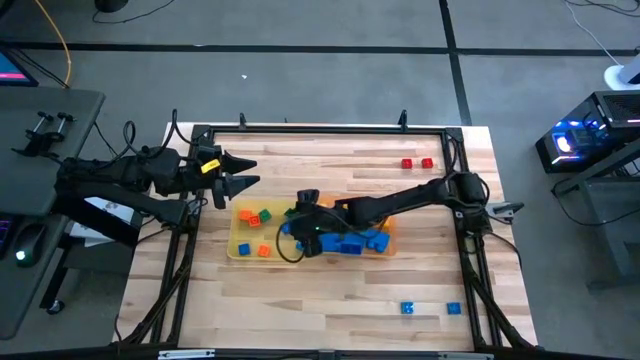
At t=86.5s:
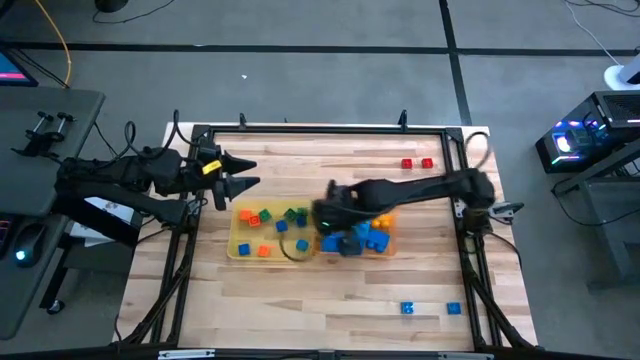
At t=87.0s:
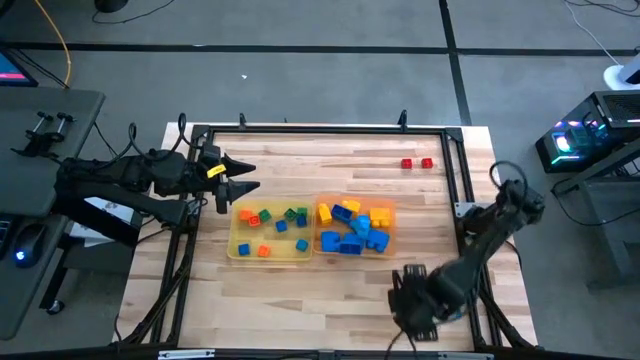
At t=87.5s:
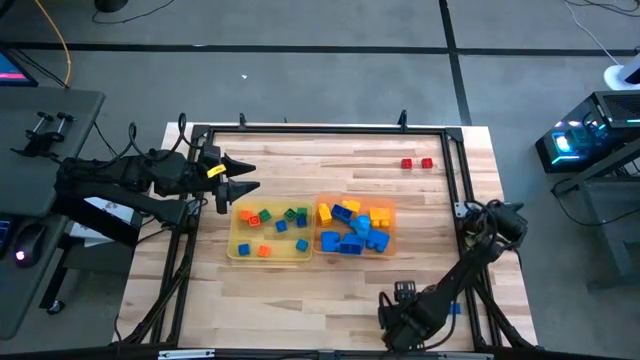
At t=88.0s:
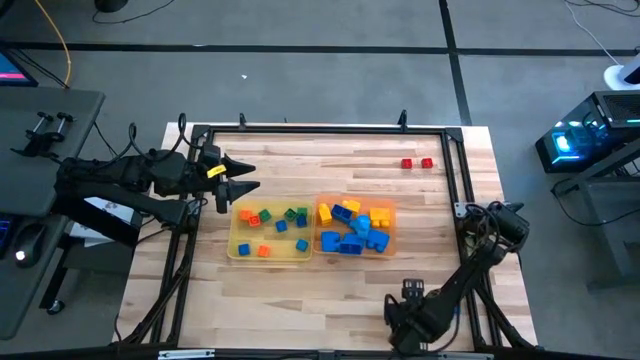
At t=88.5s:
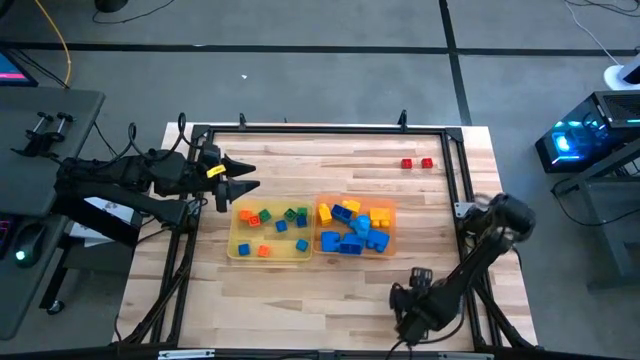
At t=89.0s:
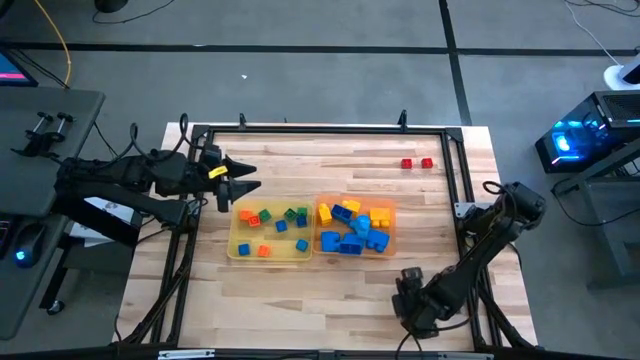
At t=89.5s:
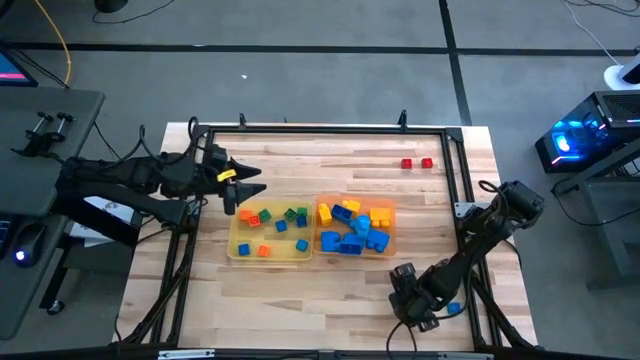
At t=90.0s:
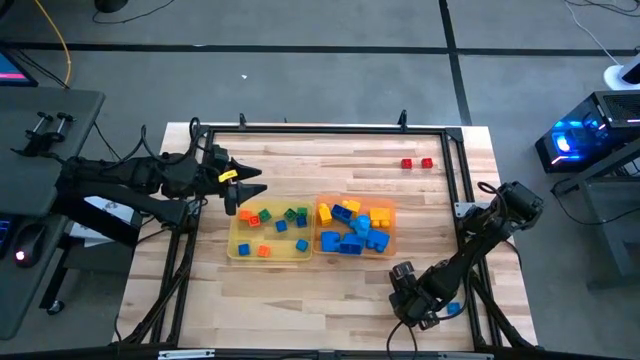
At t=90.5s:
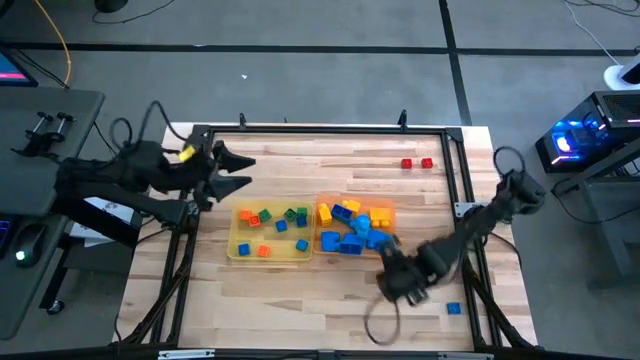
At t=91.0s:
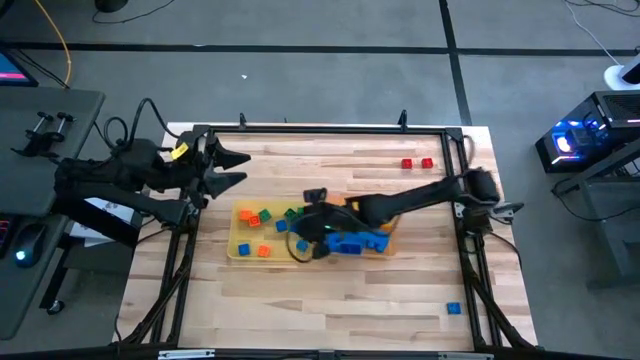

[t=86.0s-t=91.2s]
Task: Sort blocks by size
Put the small blue game piece into the yellow bin

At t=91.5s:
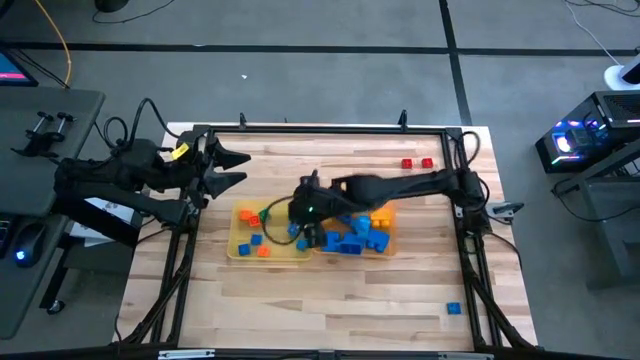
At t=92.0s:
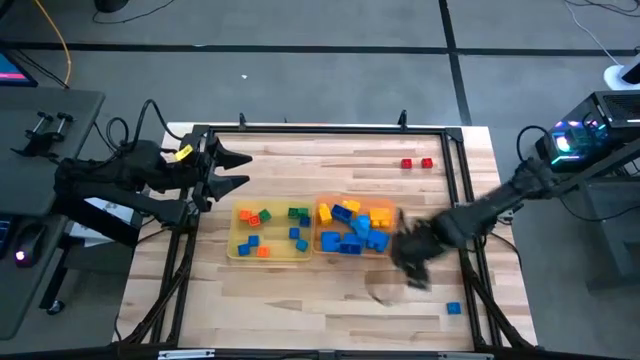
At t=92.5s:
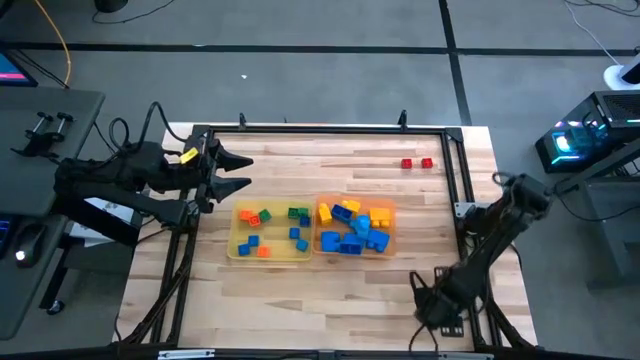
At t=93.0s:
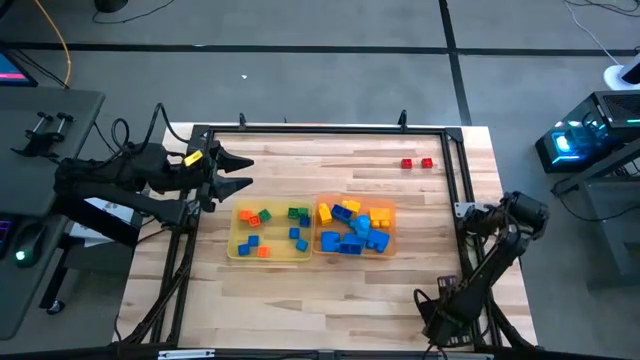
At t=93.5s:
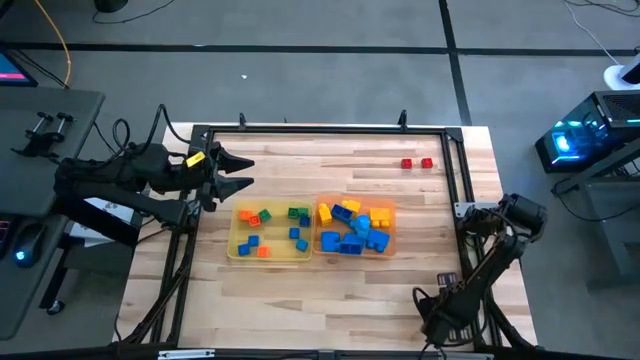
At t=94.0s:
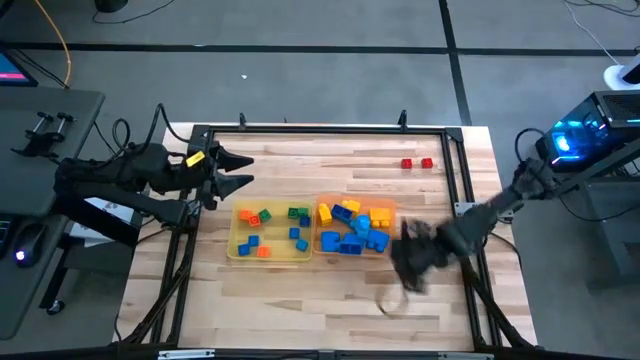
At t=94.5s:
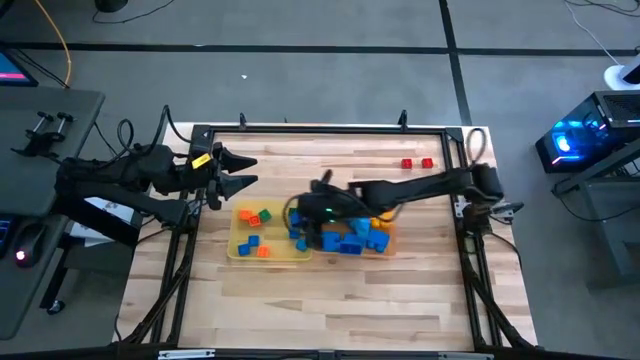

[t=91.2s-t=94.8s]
Put the small blue game piece into the yellow bin

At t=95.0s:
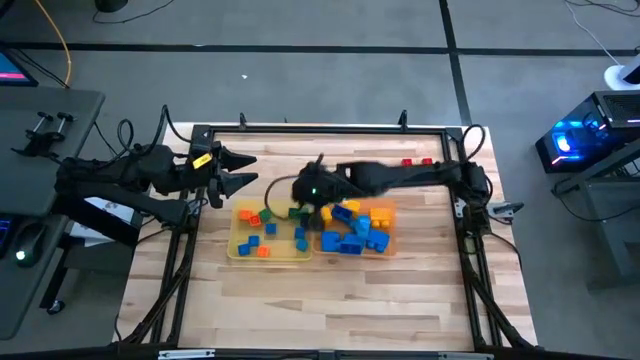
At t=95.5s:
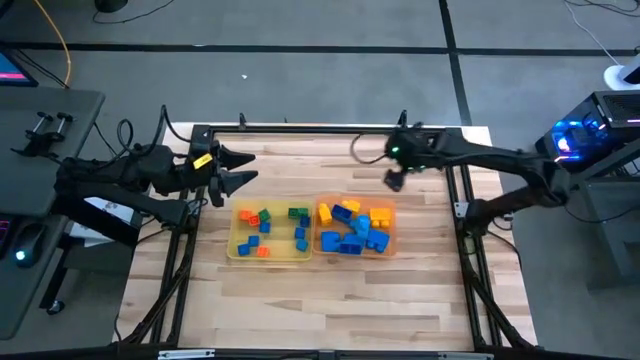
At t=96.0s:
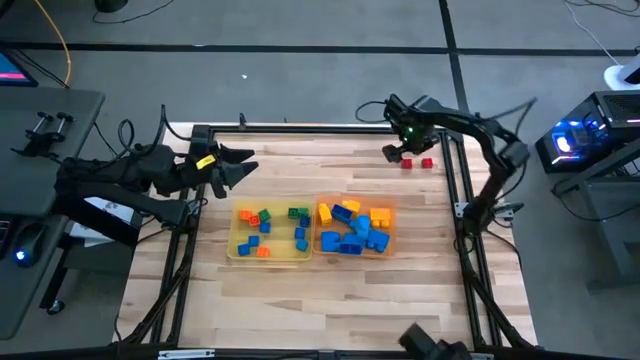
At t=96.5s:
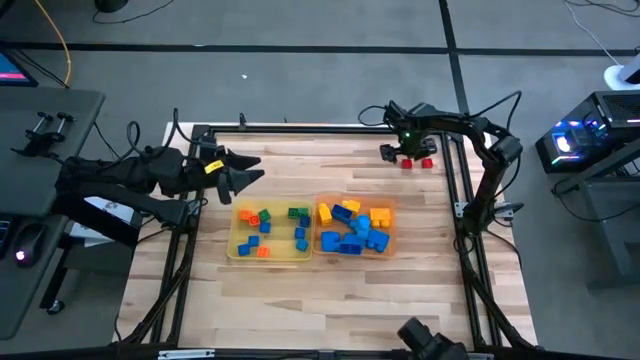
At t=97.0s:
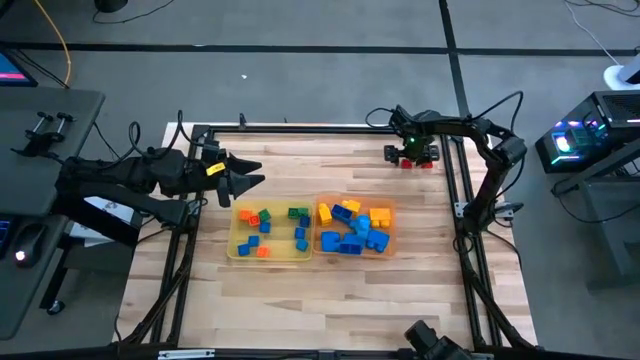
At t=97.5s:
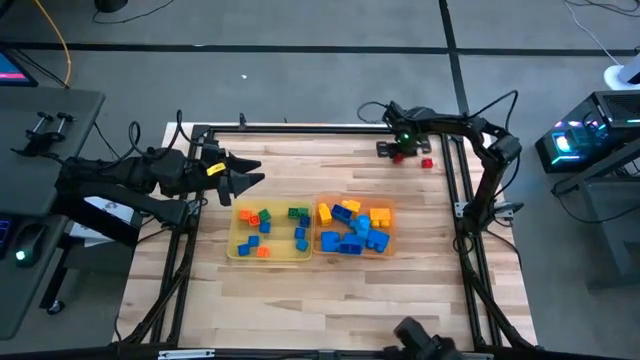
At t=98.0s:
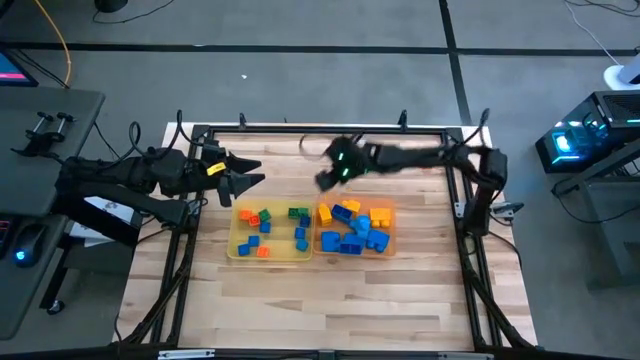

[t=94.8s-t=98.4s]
Put the left small red game piece into the yellow bin

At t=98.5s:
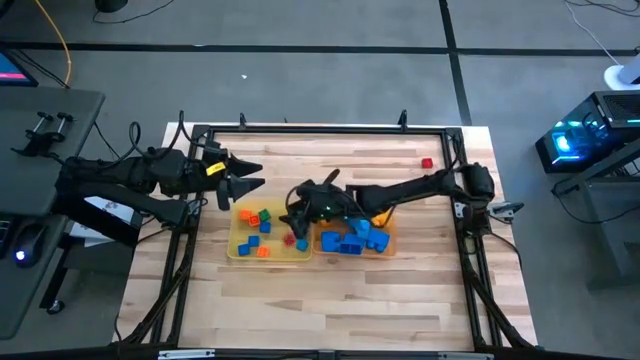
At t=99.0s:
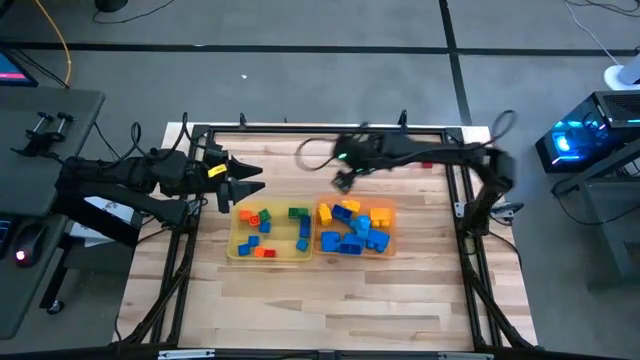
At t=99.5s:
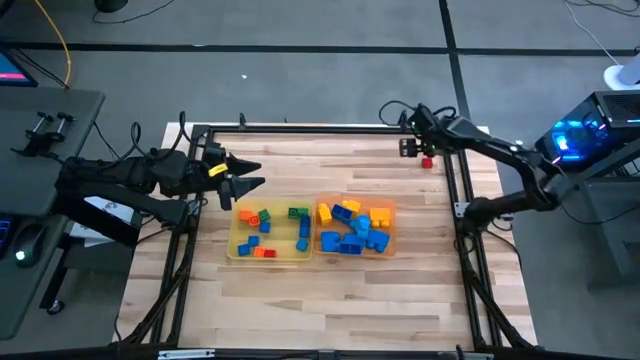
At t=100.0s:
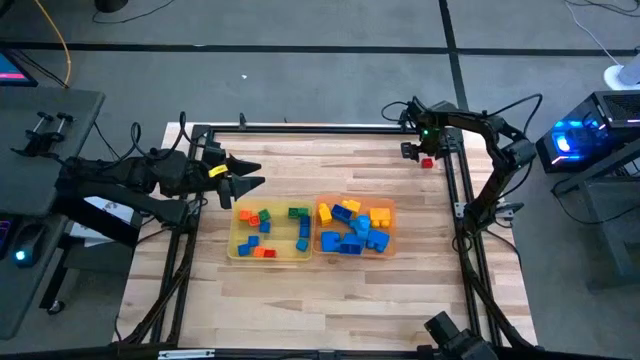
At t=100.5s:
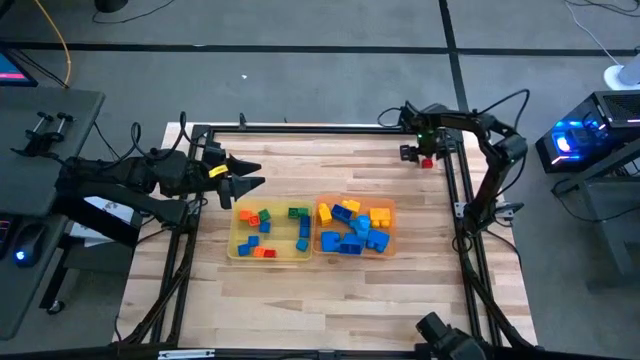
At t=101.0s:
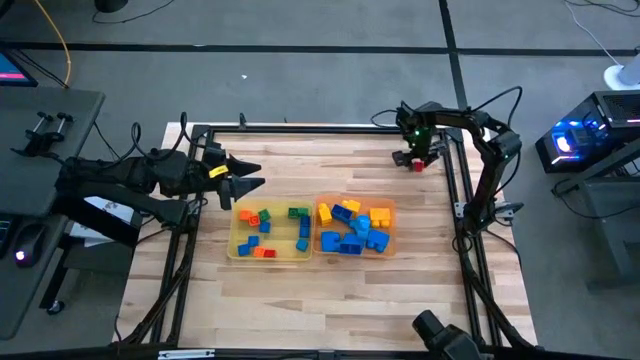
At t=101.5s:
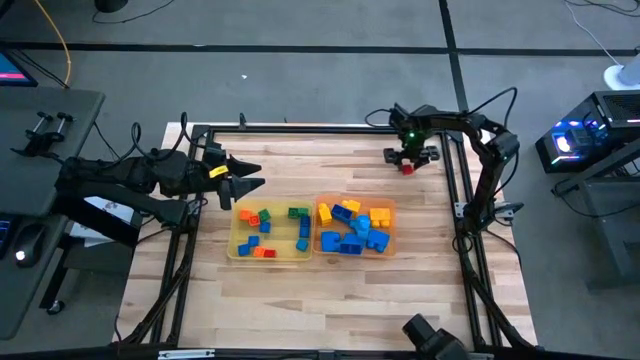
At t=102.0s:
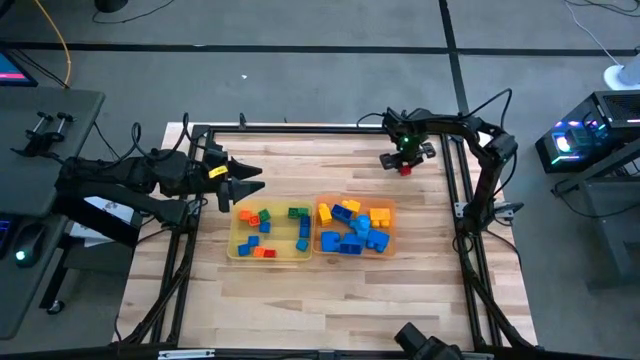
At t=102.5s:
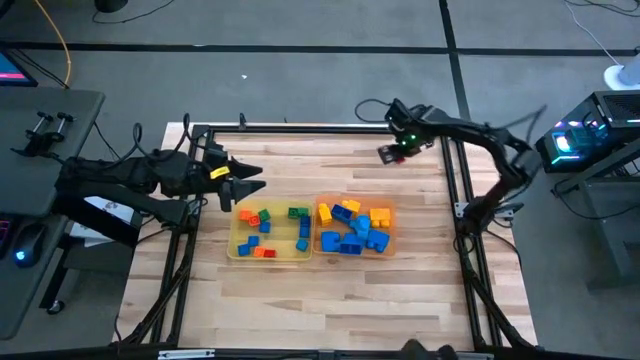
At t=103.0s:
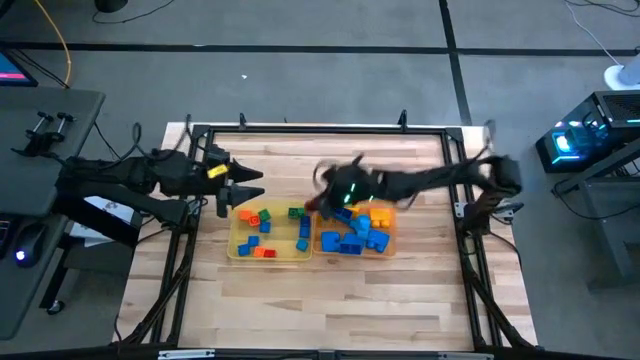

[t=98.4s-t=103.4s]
Put the small red game piece into the yellow bin

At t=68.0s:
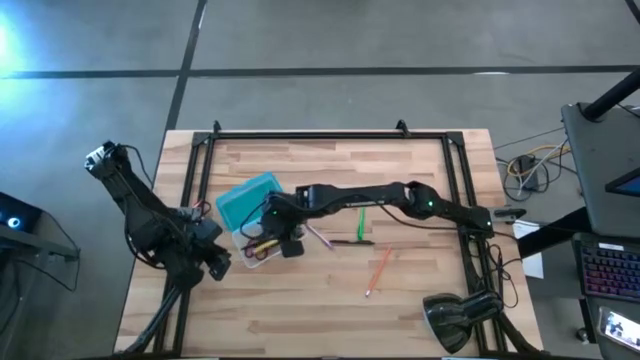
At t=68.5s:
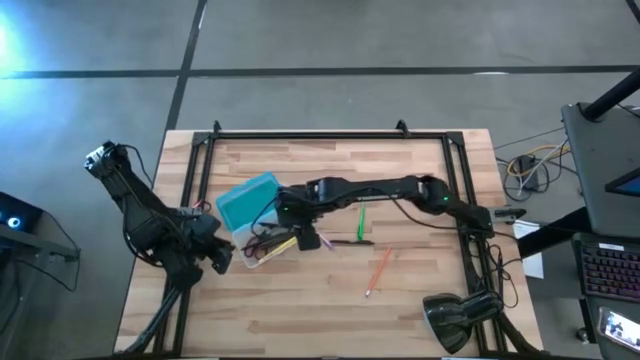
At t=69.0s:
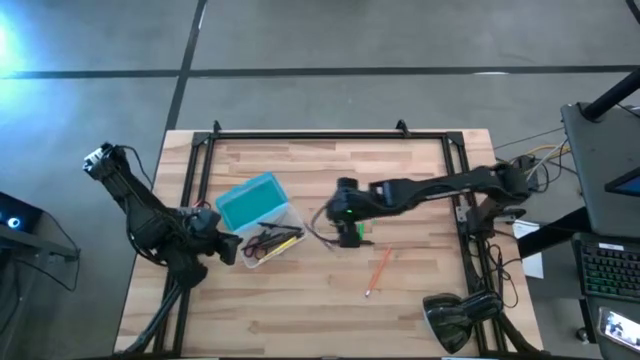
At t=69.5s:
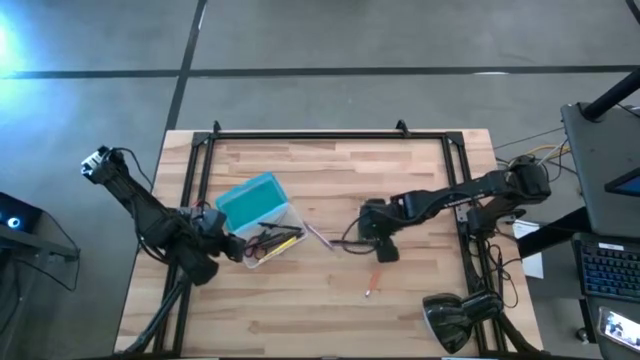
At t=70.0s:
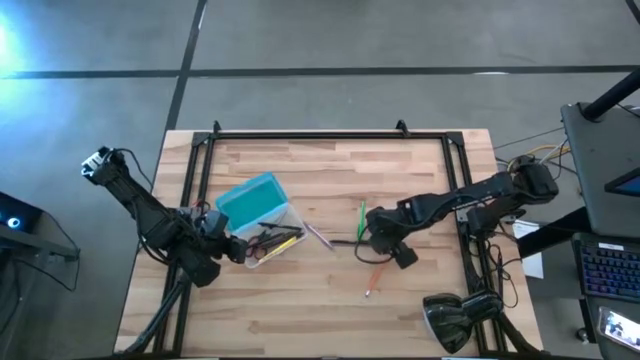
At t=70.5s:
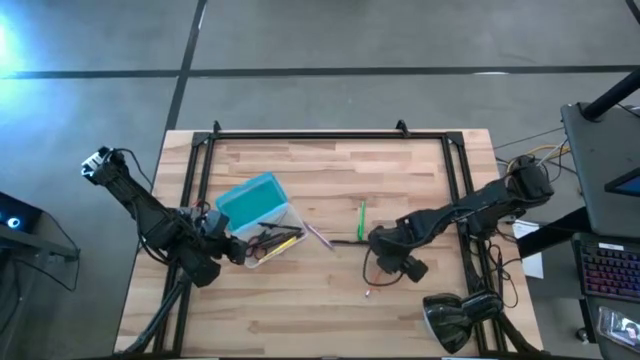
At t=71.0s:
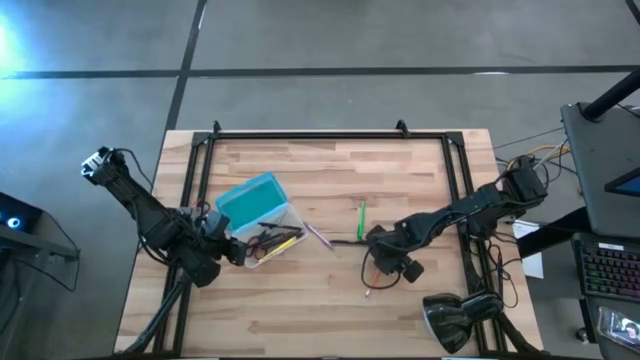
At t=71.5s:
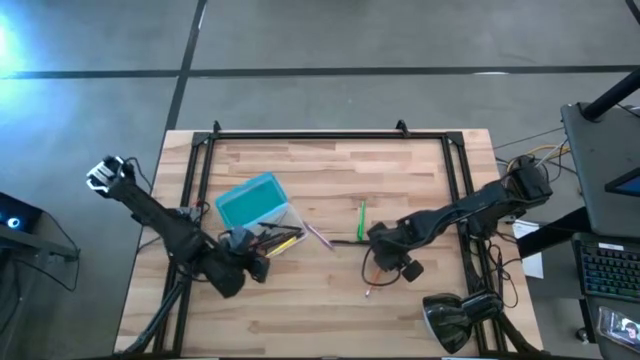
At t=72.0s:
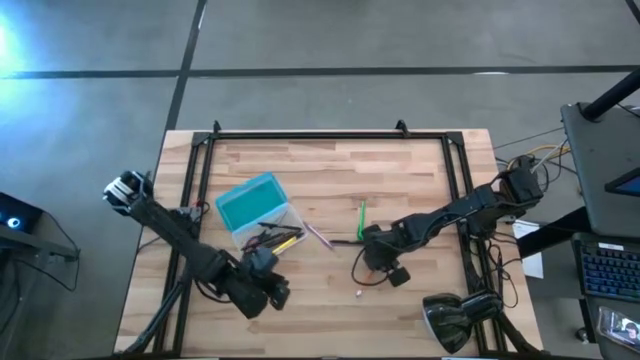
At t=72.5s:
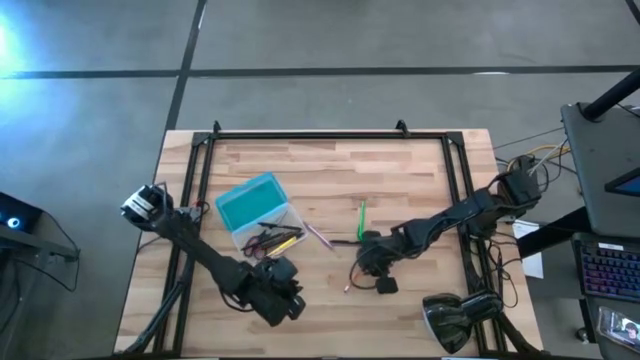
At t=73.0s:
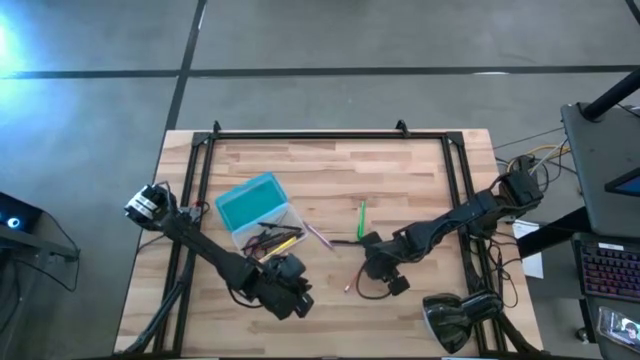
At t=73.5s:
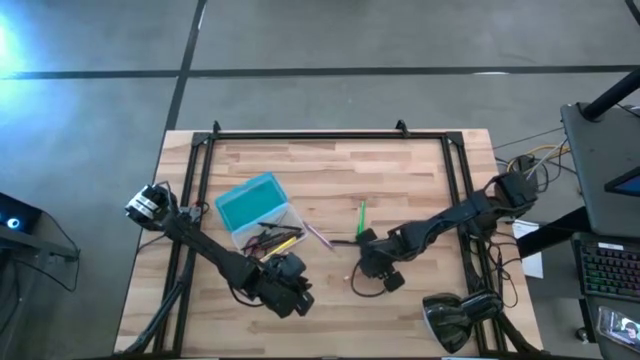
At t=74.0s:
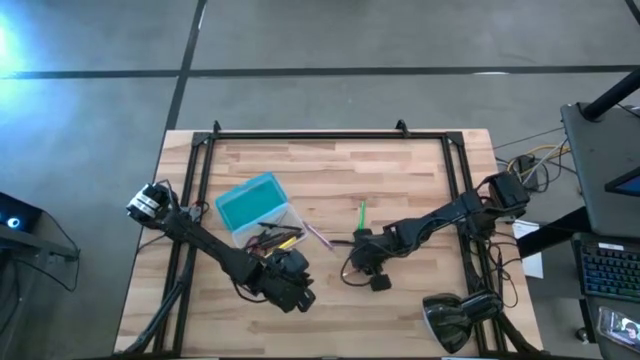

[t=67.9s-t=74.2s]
Task: Pick & place school supplies into a supply box
Put the orange pencil into the blue supply box
